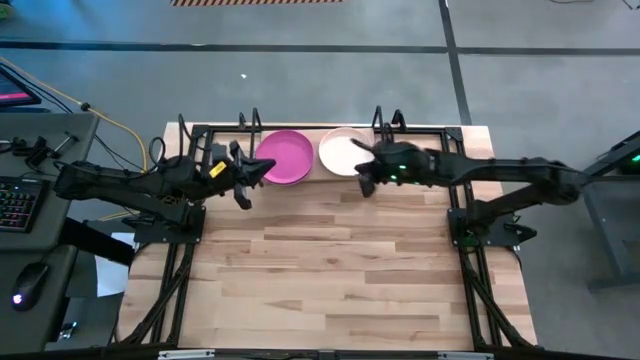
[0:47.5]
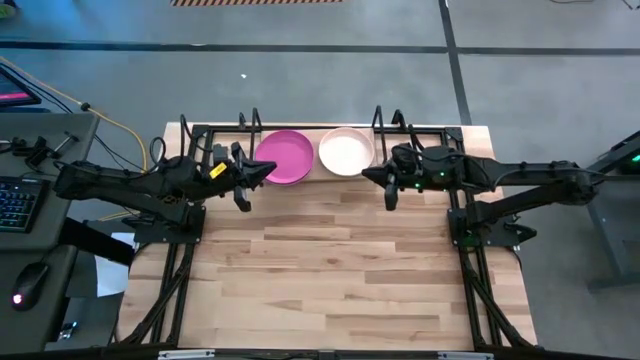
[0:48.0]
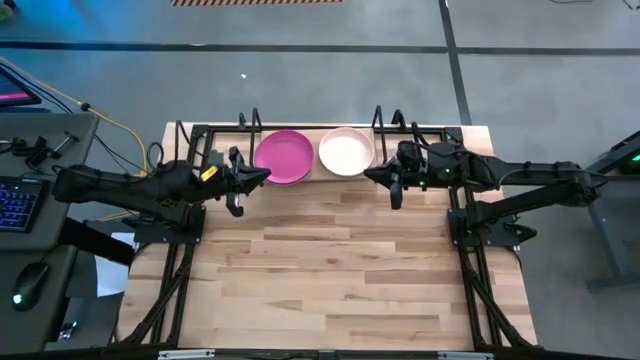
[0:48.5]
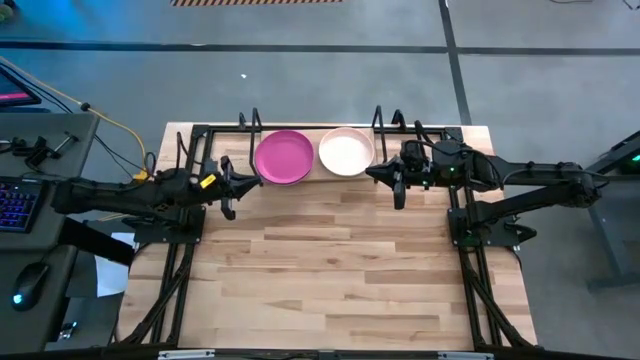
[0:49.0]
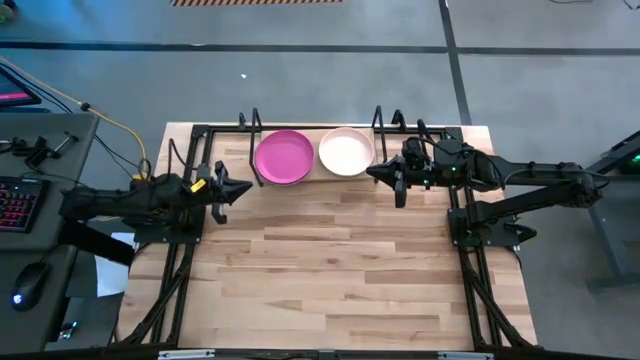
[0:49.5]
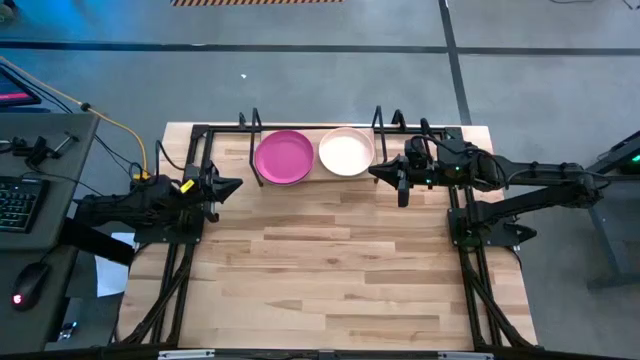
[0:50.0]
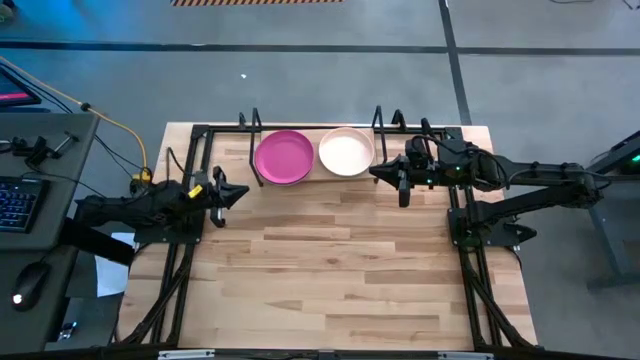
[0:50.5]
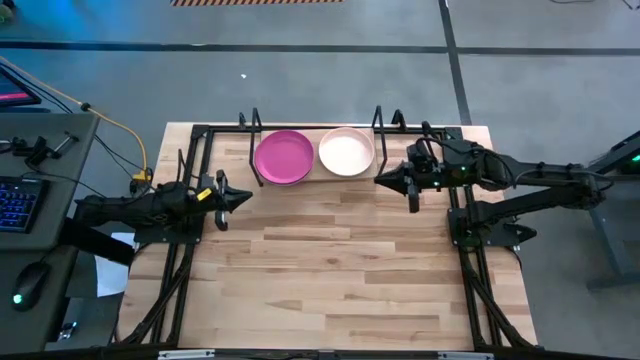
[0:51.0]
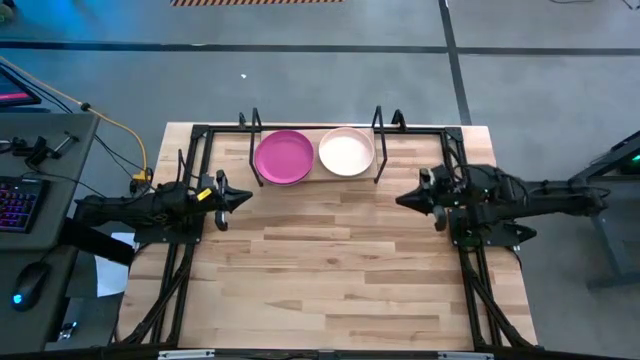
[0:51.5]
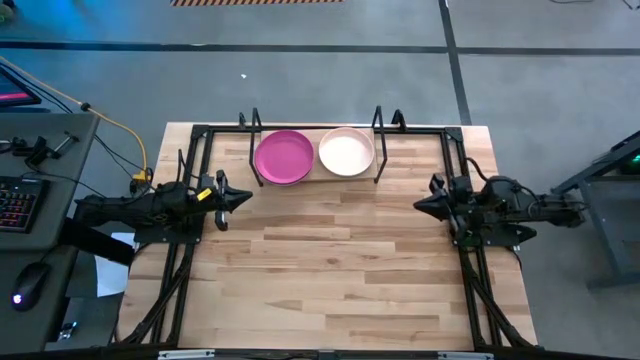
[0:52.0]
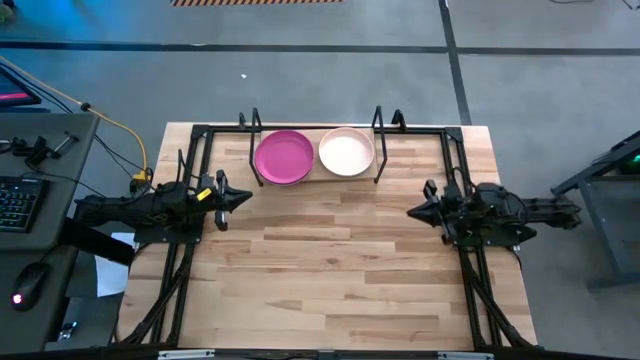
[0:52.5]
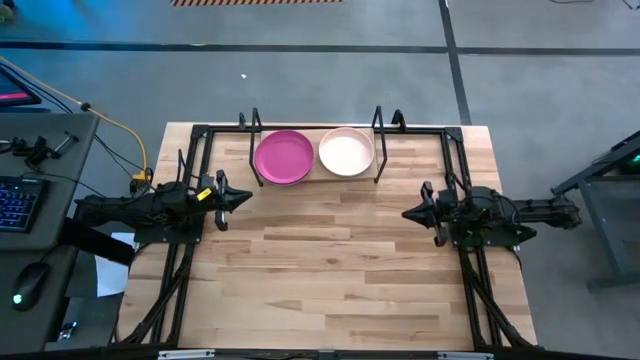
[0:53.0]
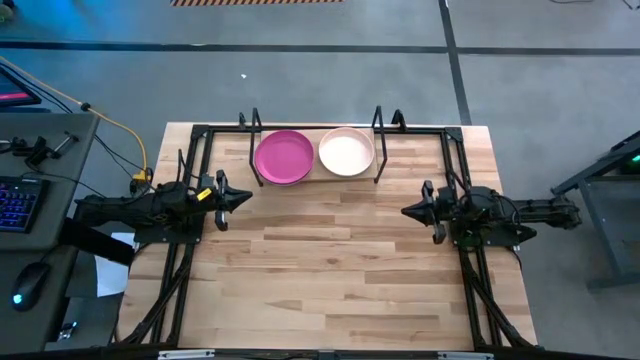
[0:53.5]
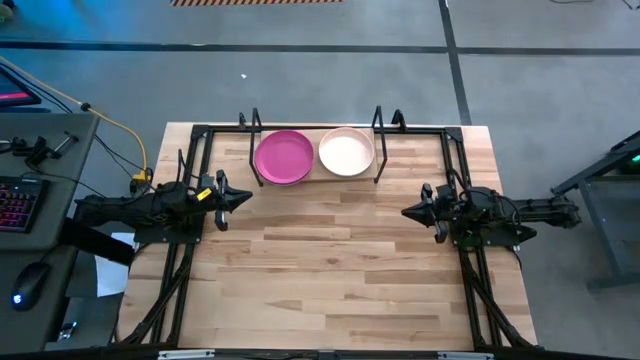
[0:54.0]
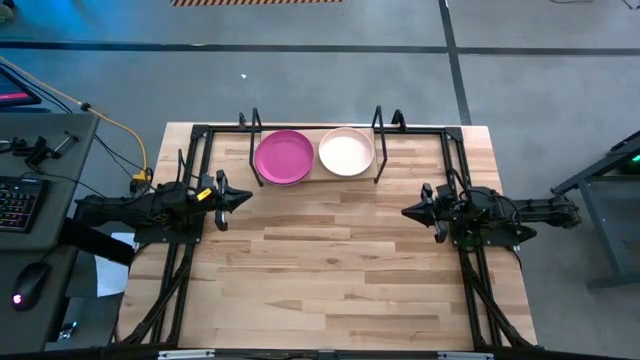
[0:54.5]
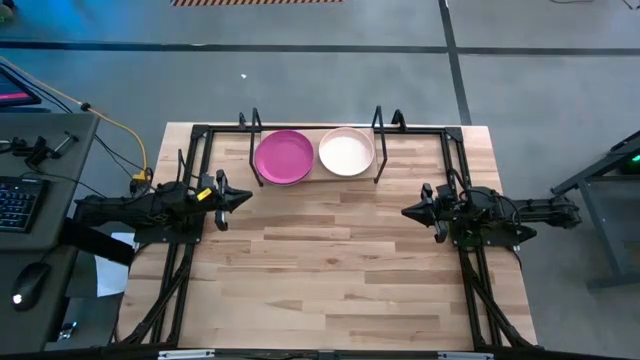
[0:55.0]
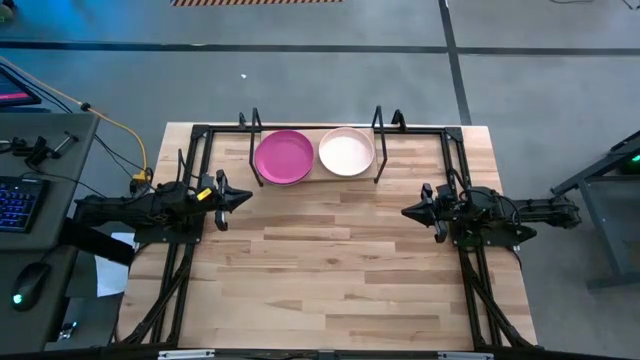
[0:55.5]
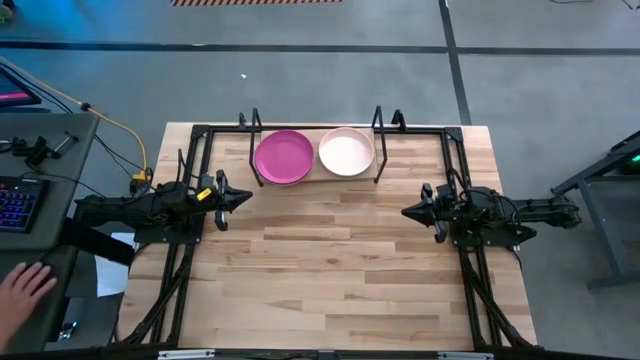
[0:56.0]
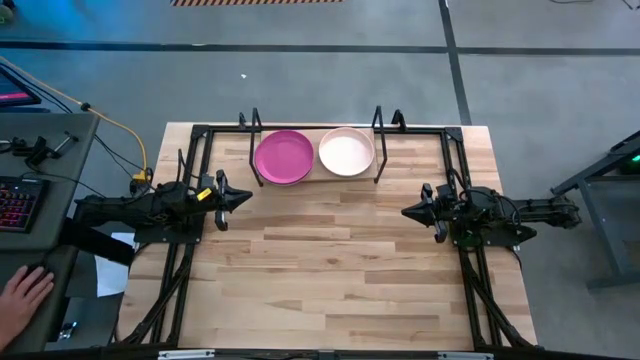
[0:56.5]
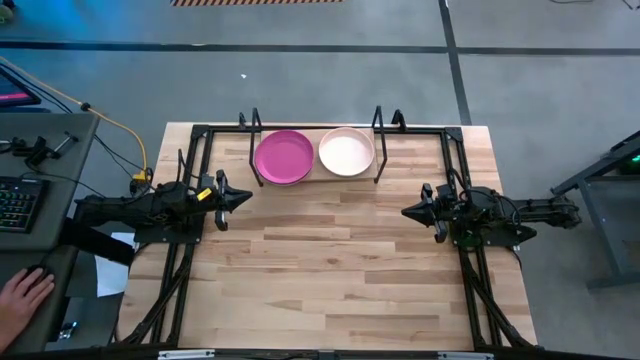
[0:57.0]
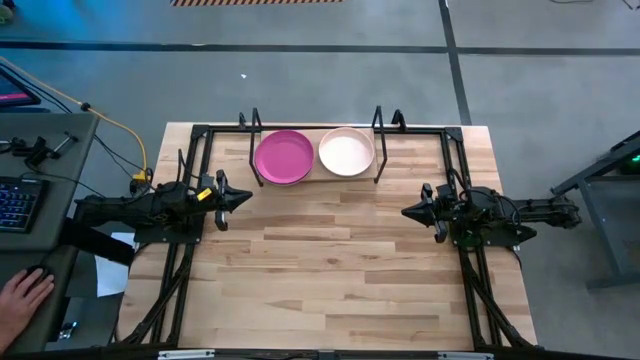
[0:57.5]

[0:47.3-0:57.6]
Task: Place and stack plates onto a shelf
Return to Home Position

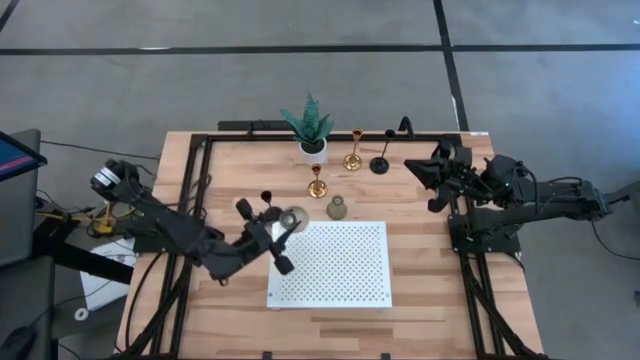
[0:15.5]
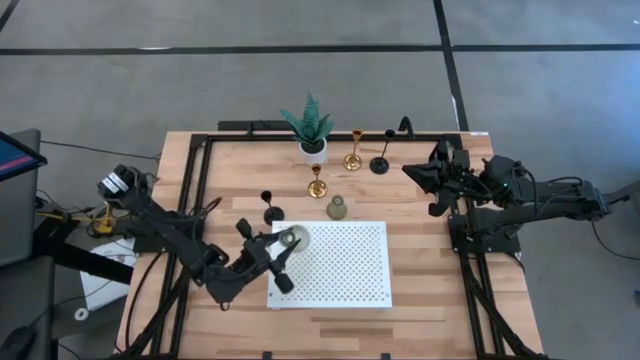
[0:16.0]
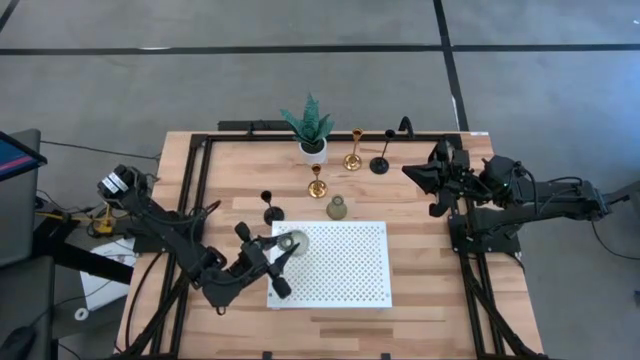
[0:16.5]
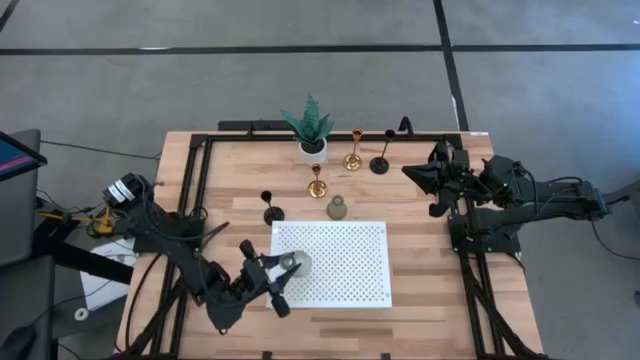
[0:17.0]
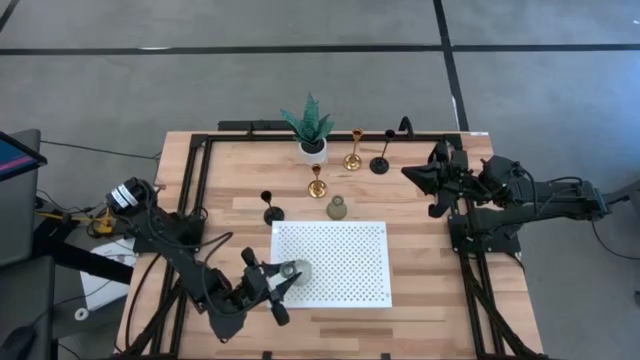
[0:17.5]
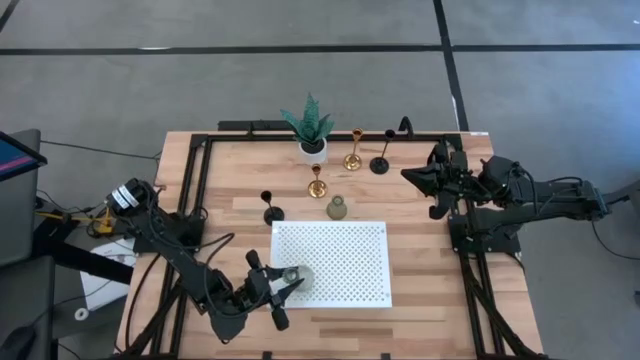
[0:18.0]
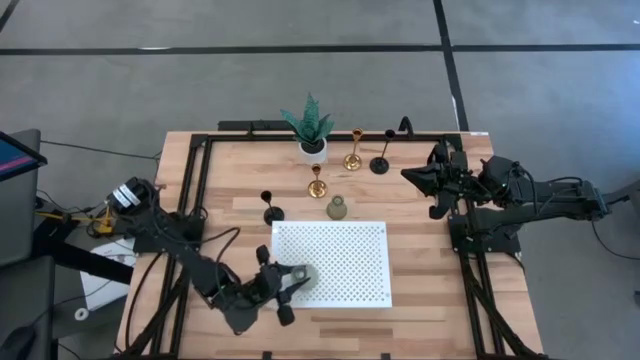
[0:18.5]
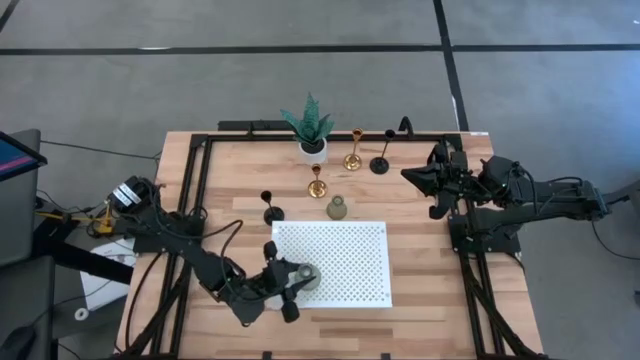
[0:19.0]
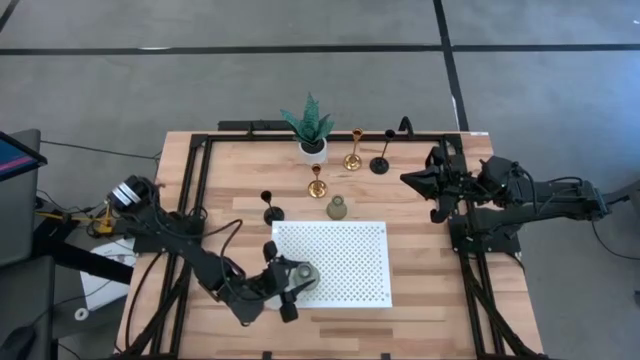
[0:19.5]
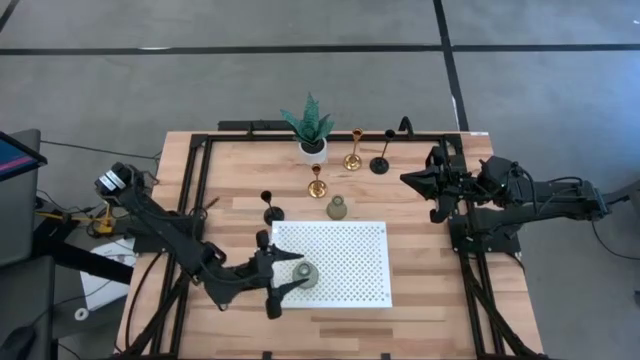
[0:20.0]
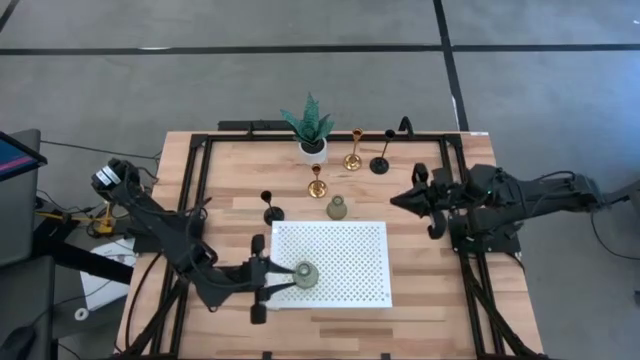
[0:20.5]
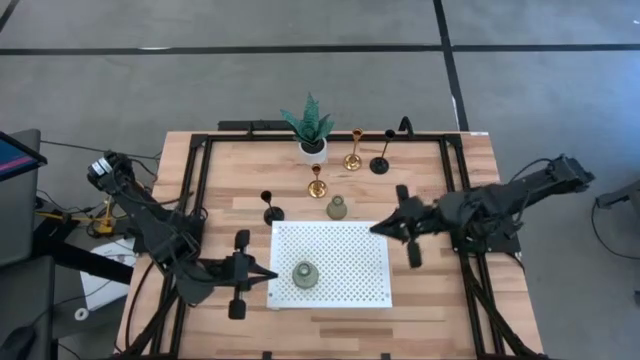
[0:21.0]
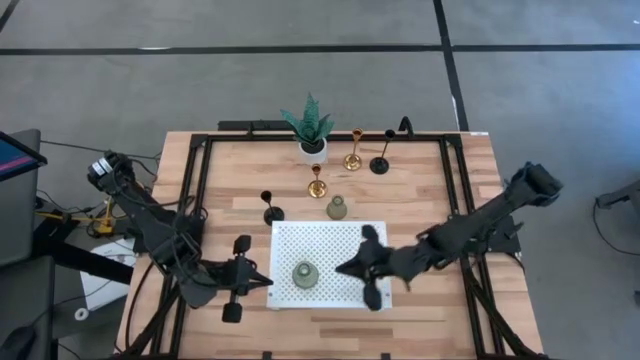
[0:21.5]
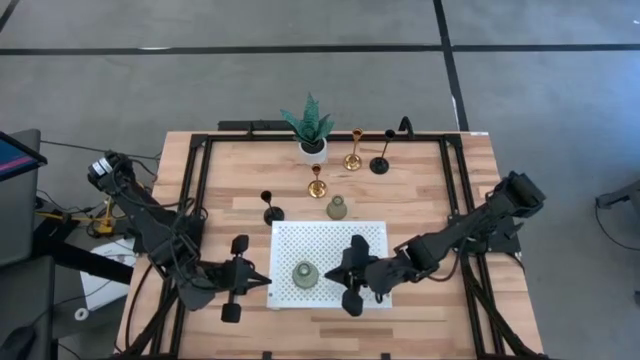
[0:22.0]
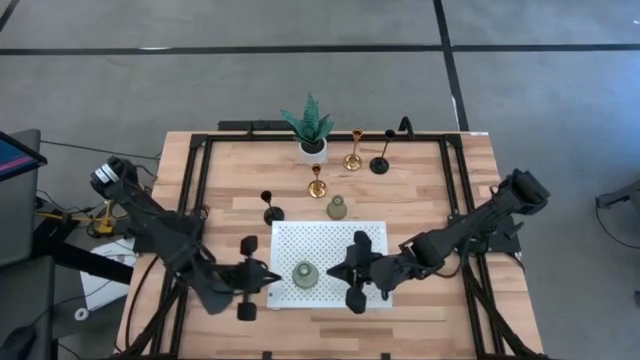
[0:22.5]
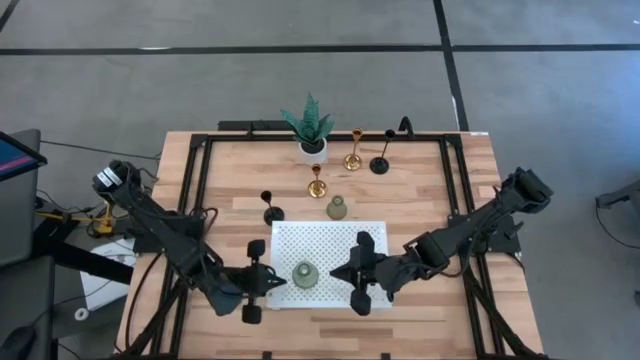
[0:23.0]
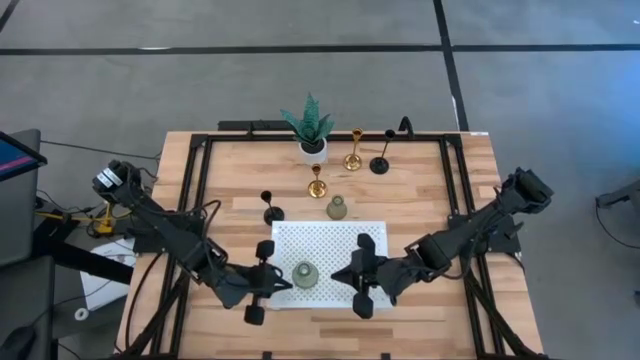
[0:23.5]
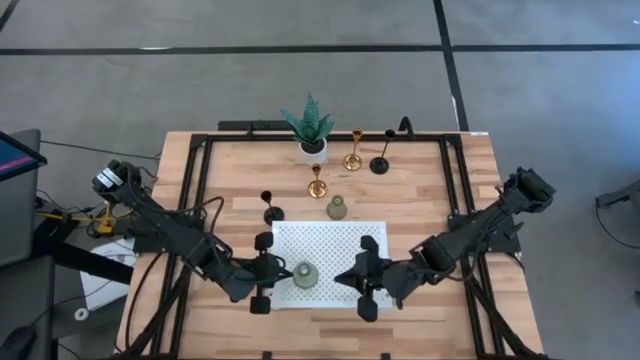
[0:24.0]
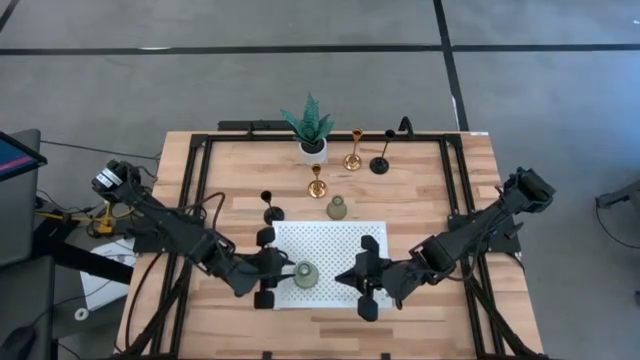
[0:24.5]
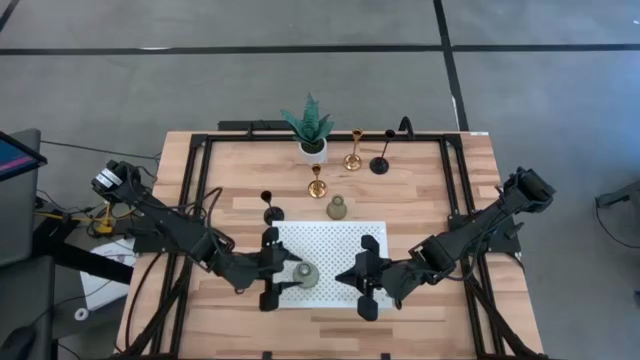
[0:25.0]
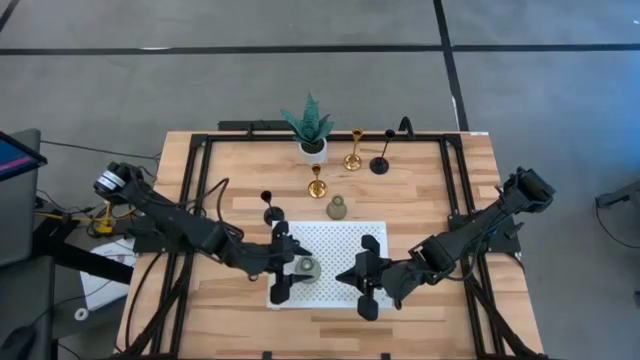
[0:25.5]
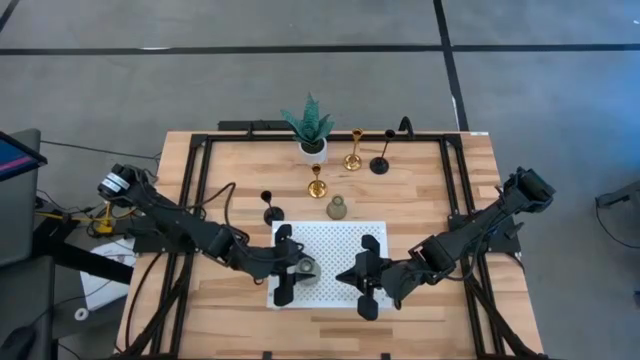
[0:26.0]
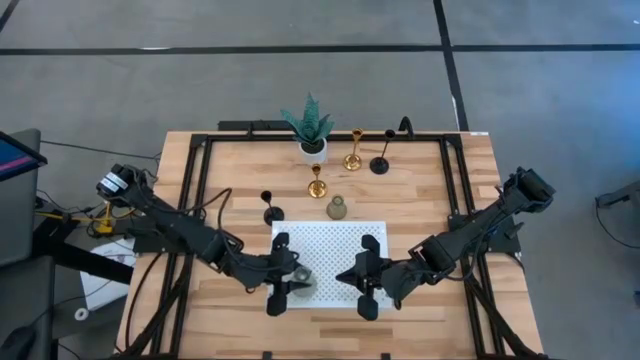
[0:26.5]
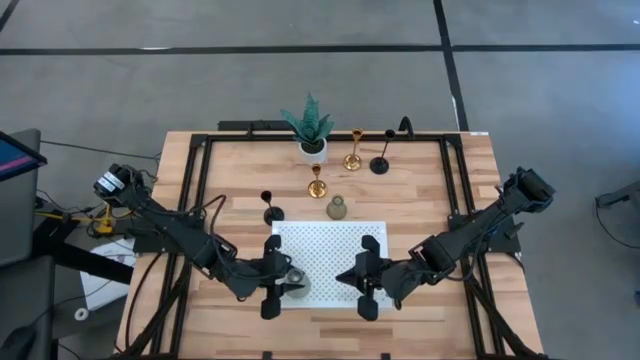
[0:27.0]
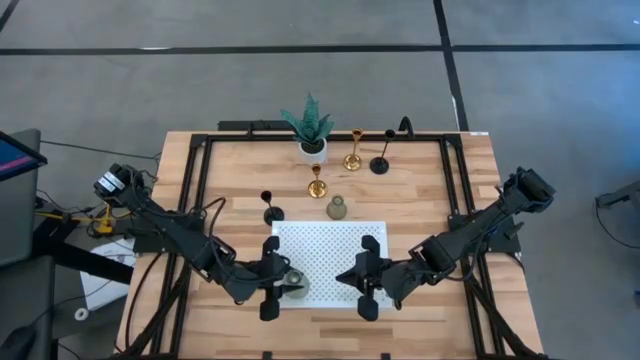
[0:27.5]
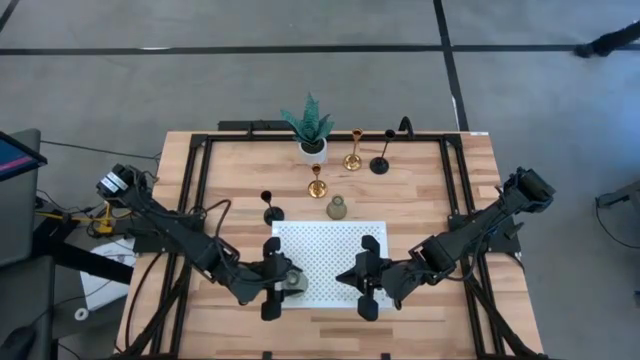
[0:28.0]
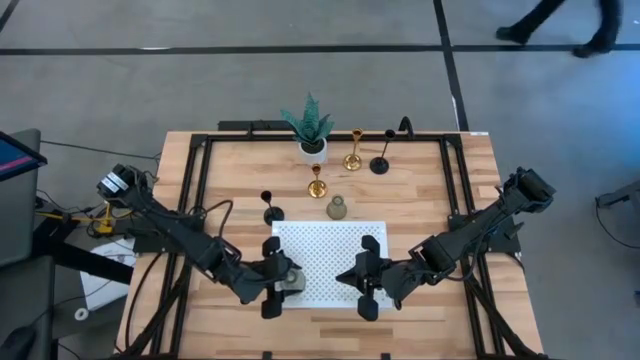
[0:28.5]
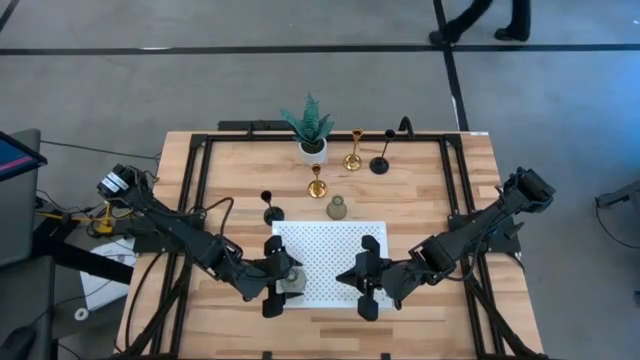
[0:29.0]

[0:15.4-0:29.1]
Task: Pick & Place candle stick holders
Put the top transparent glass candle holder on the shelf
